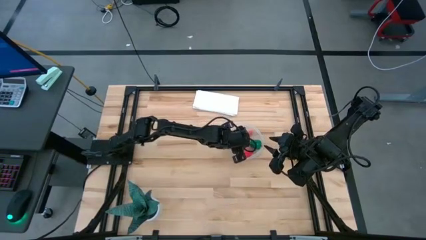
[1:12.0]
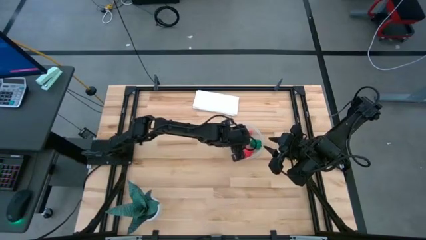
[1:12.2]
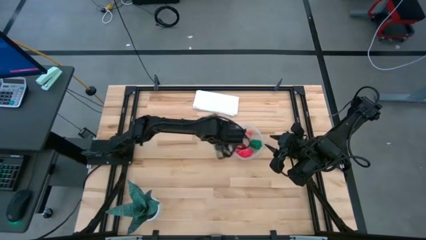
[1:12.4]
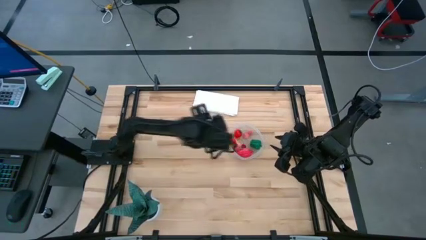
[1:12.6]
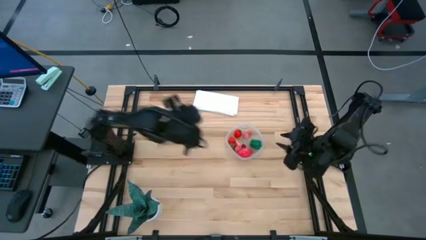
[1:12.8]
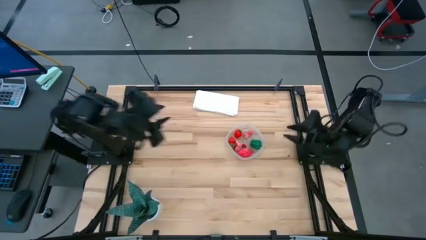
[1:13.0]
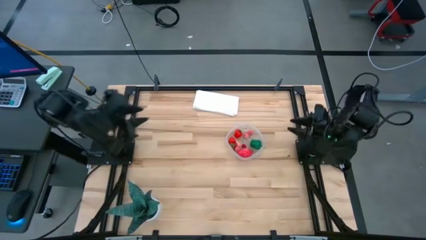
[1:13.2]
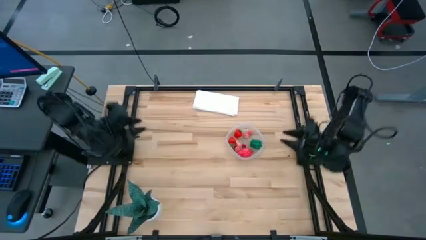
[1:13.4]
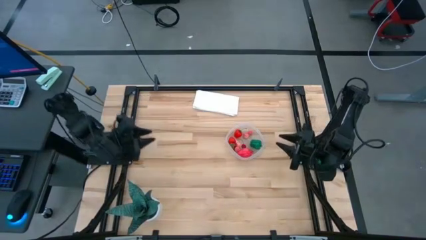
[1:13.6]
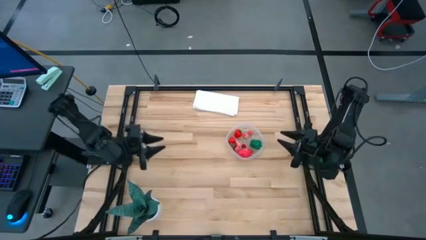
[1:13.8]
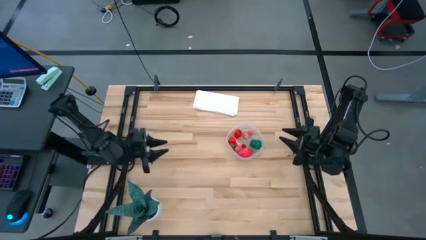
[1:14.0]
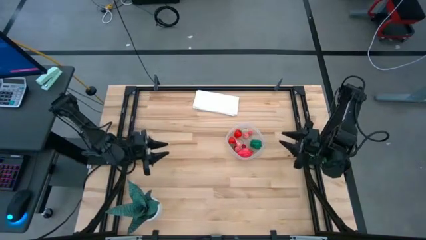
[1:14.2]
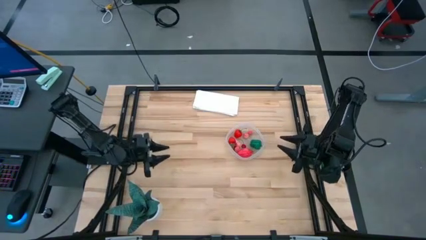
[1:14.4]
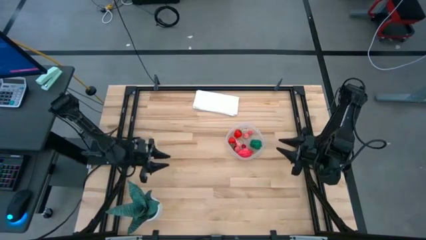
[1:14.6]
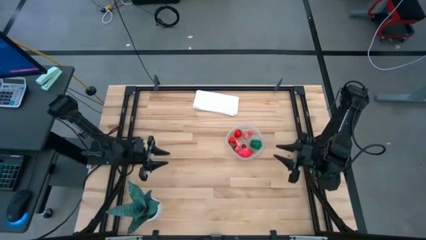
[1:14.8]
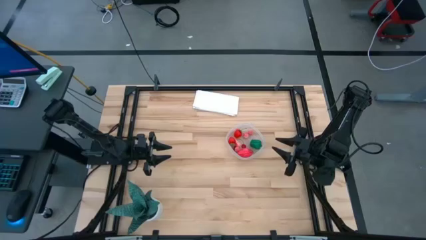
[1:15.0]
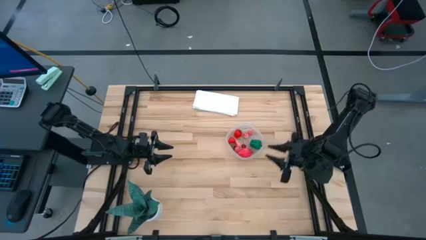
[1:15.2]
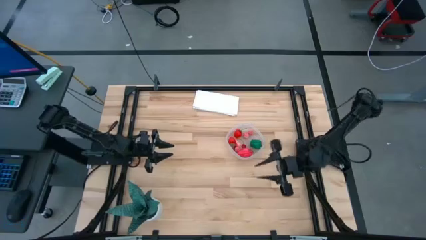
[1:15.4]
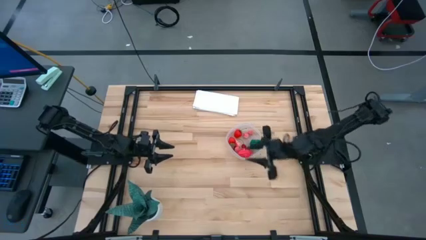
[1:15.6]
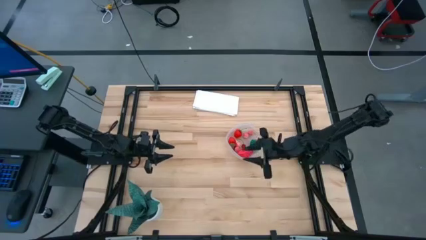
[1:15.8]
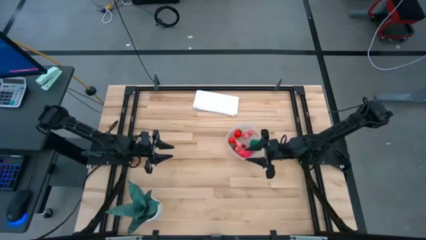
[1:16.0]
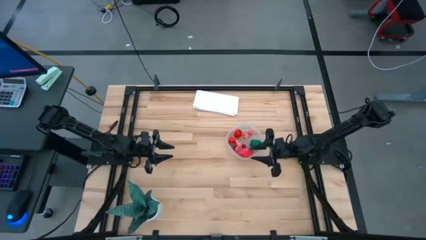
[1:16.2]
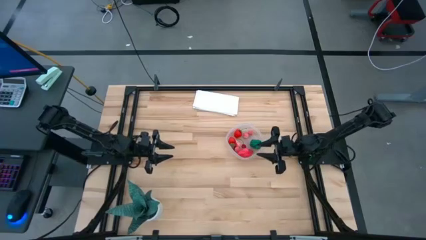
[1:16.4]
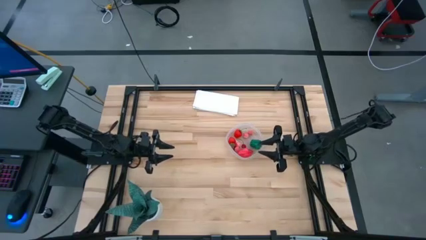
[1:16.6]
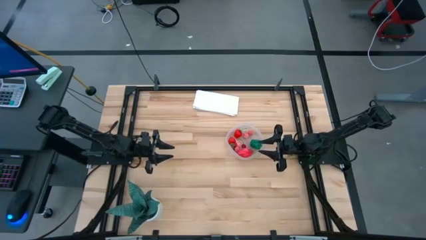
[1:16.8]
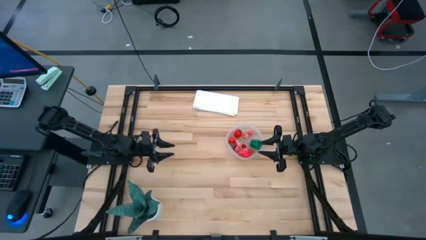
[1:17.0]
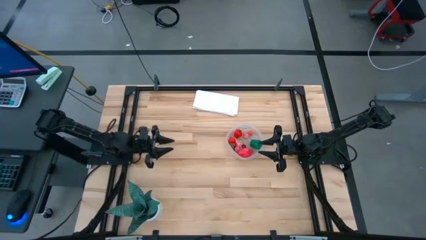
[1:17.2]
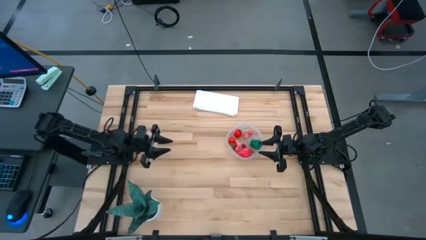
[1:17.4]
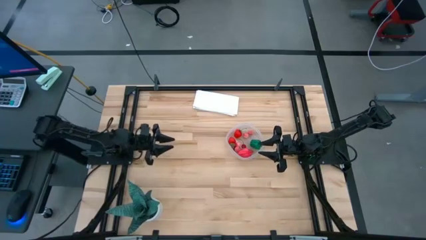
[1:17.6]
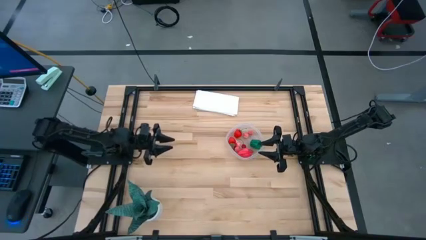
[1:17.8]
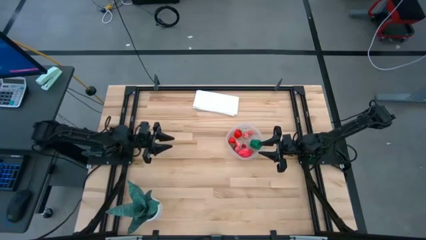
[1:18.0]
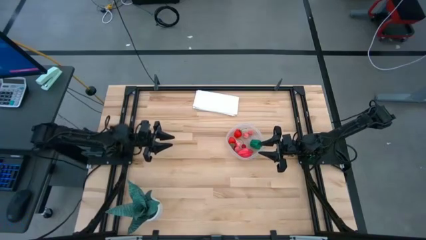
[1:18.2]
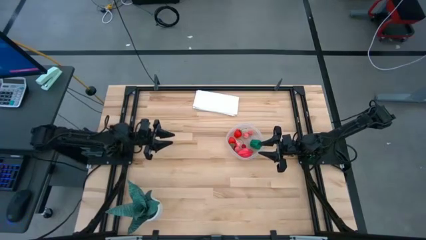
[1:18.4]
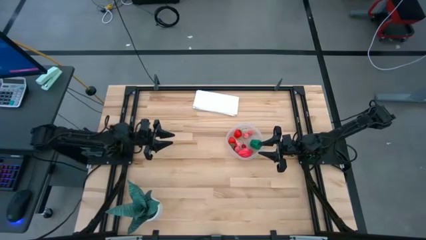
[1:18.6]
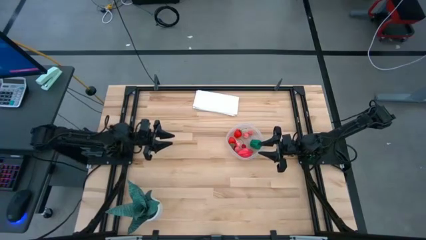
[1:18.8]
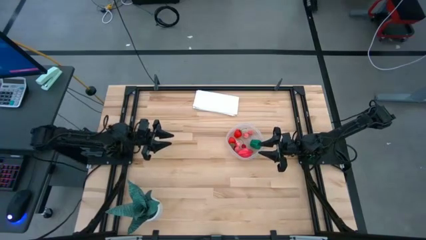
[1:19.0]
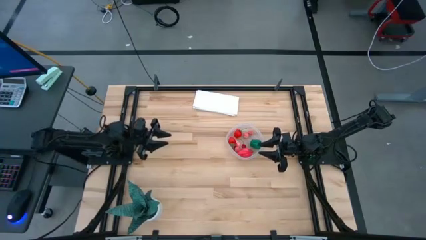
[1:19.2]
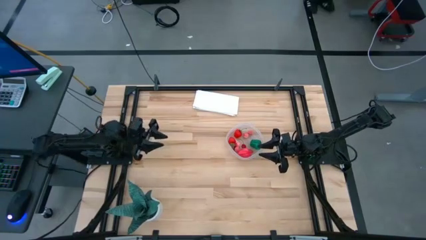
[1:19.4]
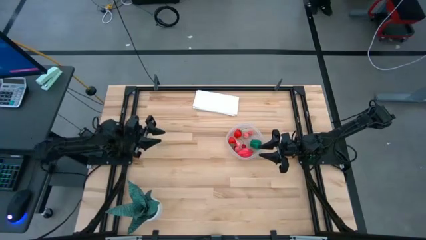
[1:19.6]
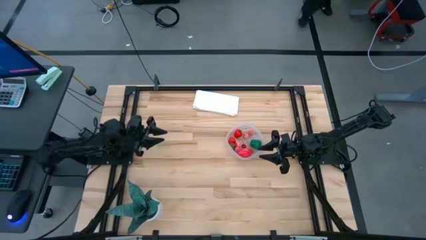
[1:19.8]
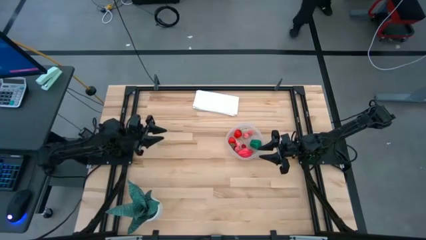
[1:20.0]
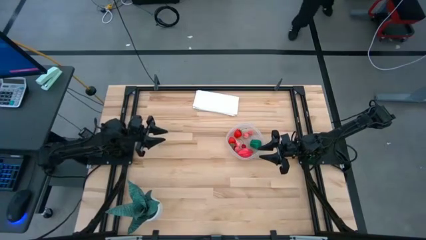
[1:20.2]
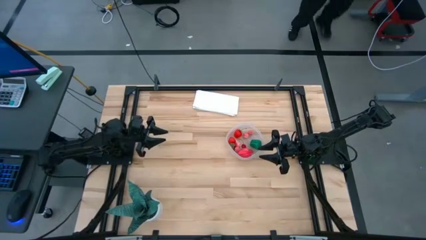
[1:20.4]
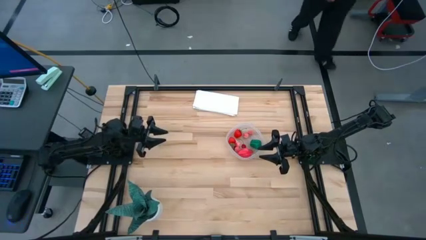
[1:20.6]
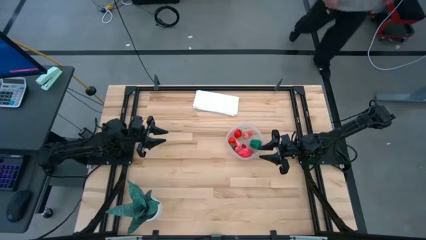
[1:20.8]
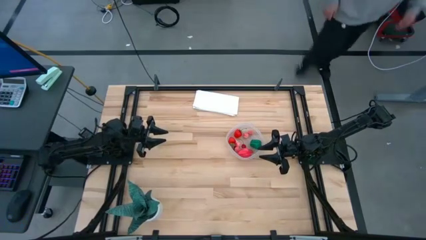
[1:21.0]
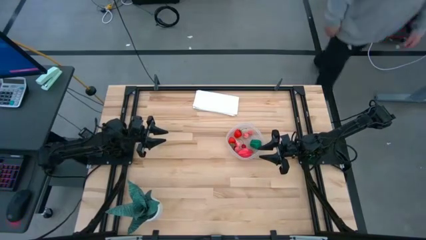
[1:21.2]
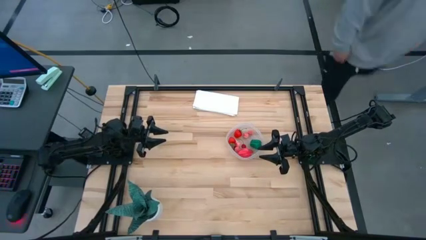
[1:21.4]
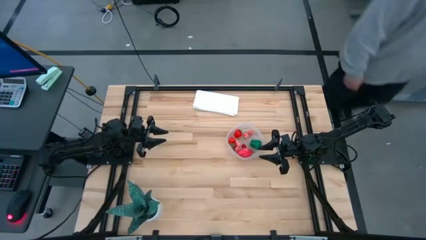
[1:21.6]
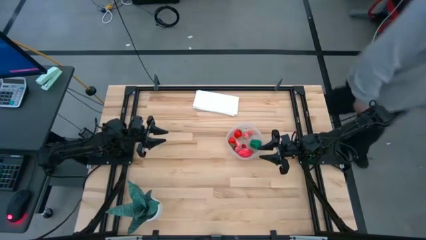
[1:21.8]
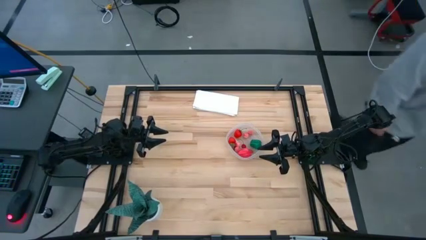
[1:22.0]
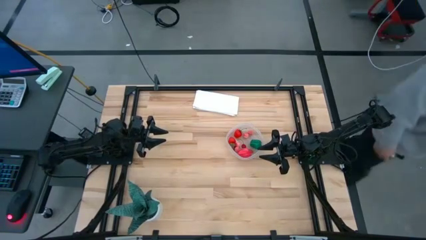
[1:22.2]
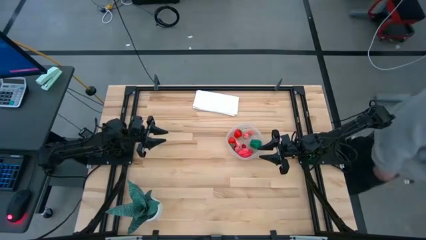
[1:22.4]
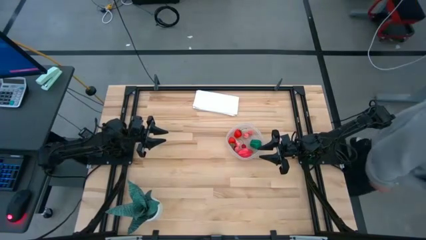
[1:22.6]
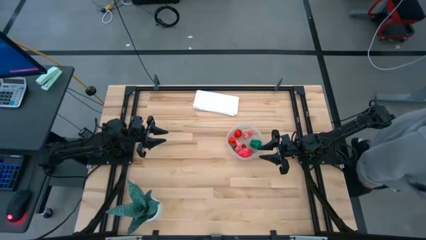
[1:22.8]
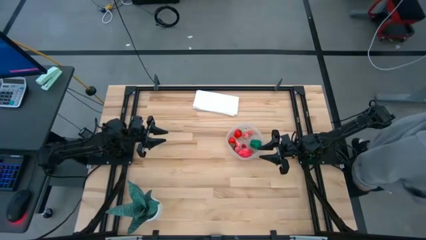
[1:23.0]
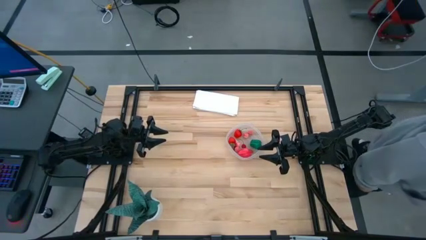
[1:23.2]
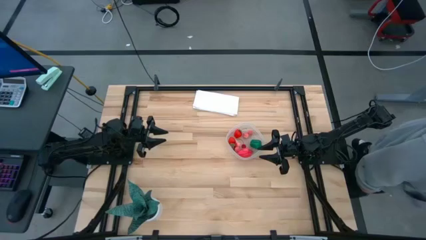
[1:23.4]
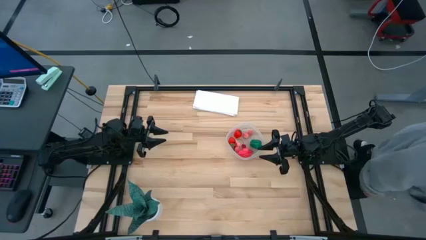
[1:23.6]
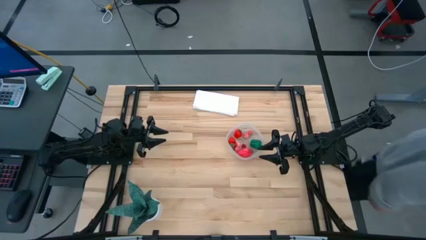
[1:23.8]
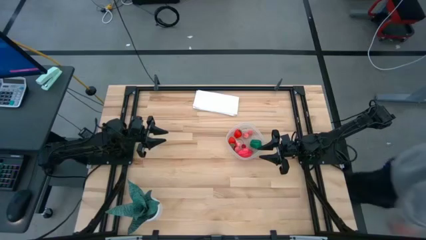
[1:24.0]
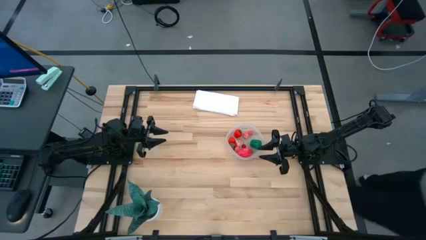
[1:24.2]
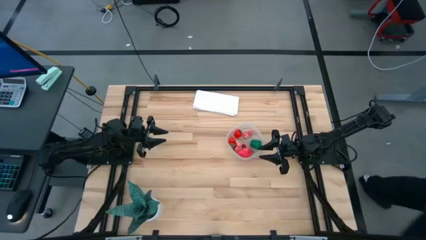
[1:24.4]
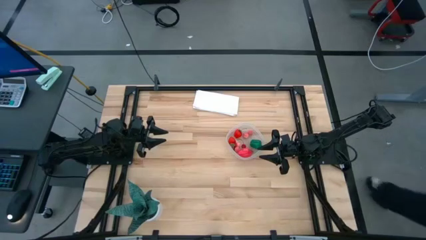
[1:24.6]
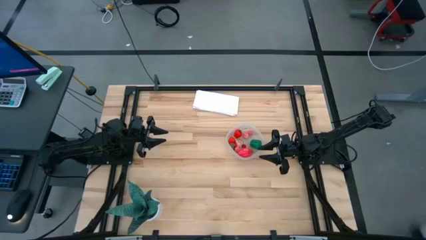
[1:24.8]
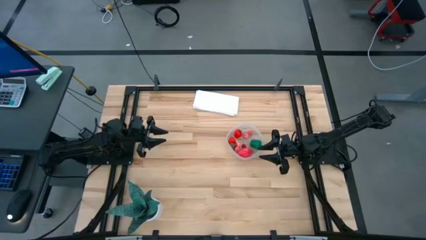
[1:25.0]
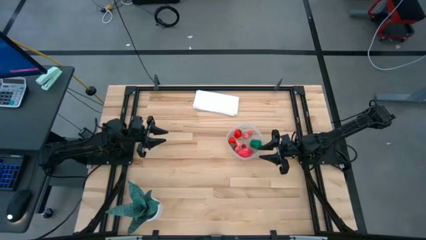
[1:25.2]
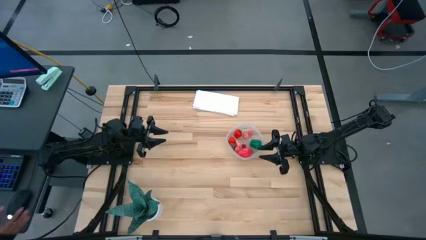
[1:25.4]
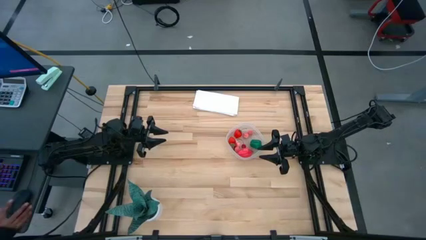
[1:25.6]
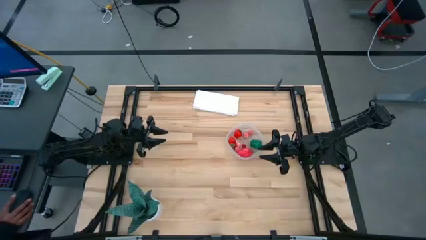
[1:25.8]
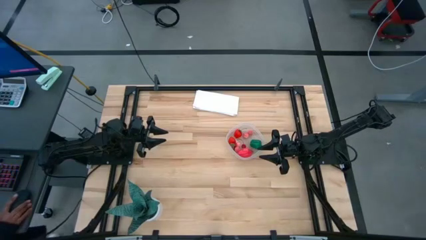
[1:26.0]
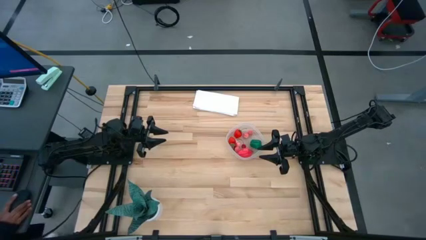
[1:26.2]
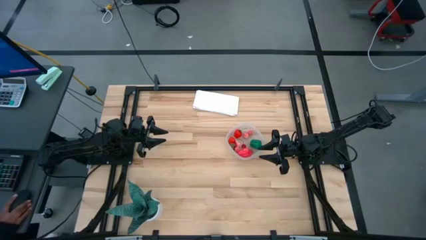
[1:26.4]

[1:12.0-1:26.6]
Task: Pick and placing Produce into tupperware
Return to Home Position
